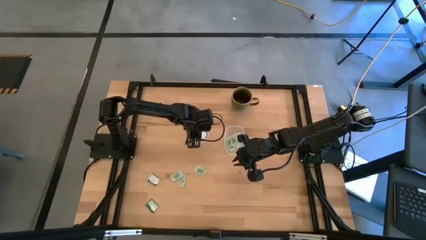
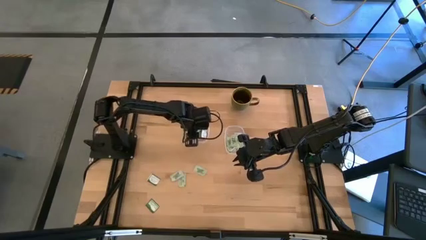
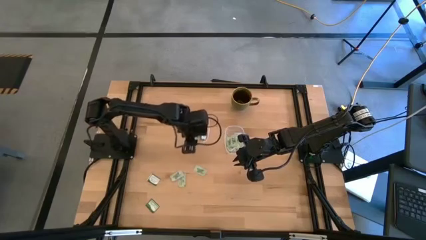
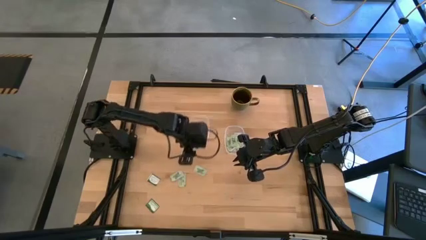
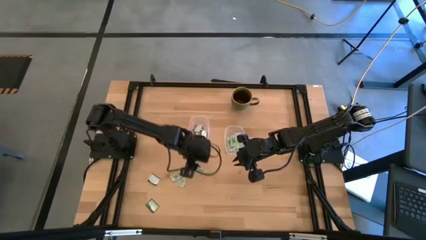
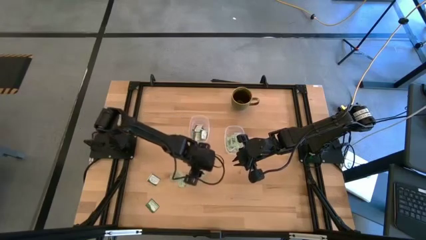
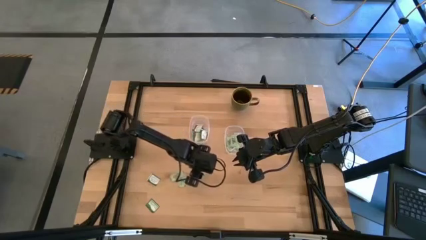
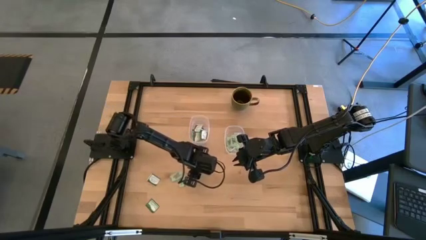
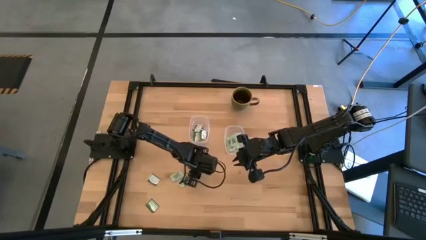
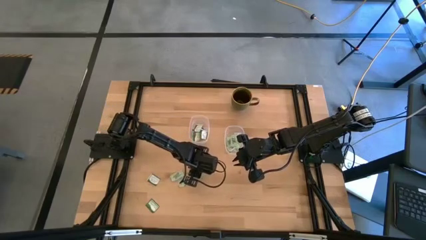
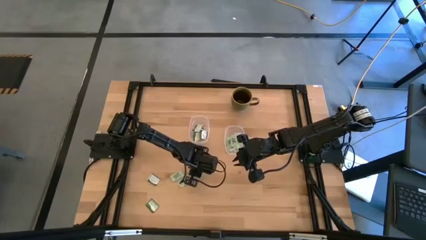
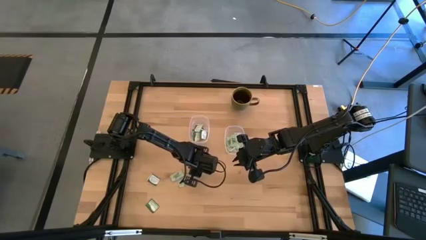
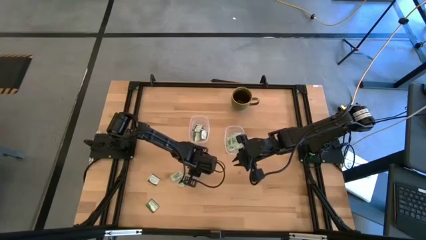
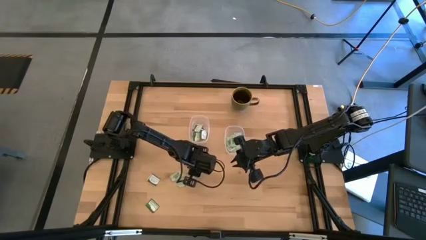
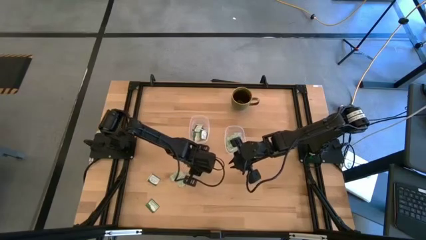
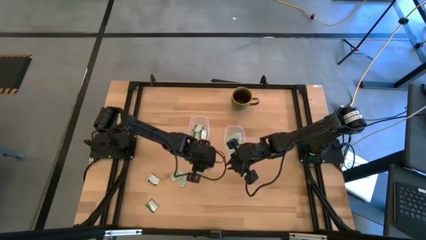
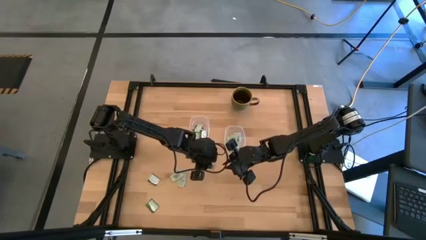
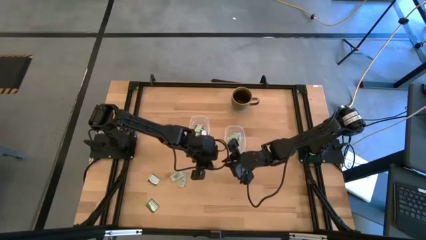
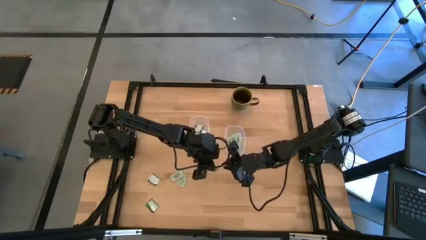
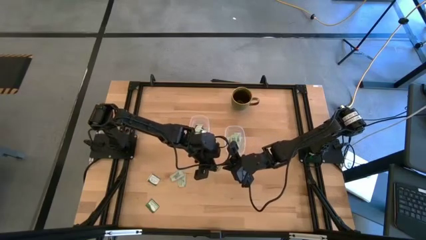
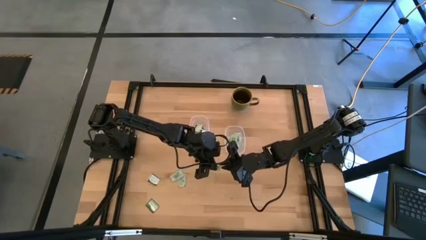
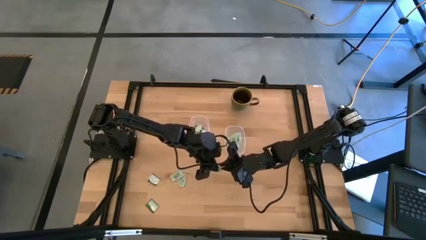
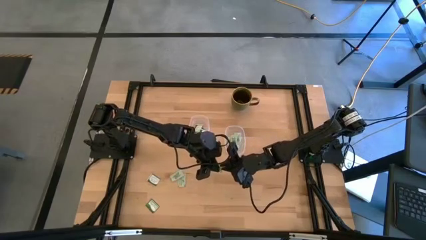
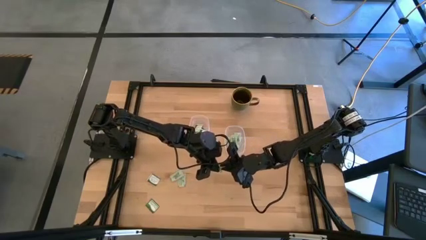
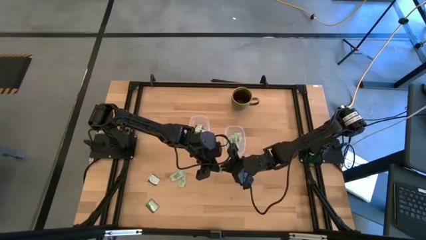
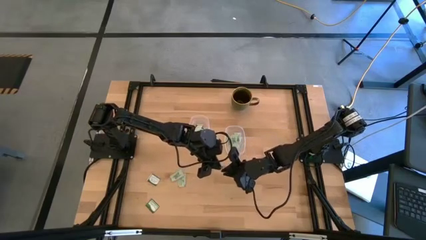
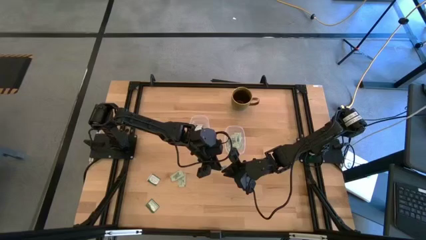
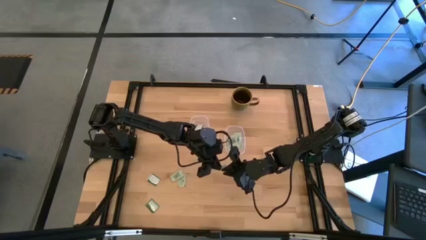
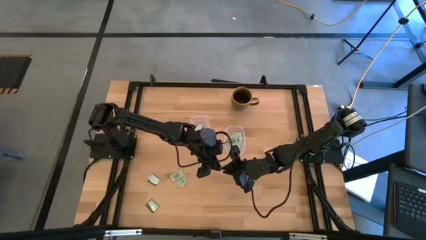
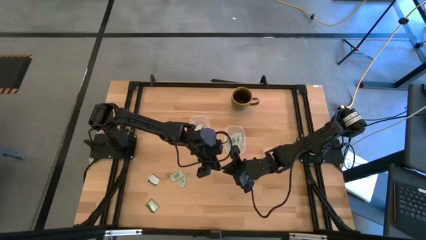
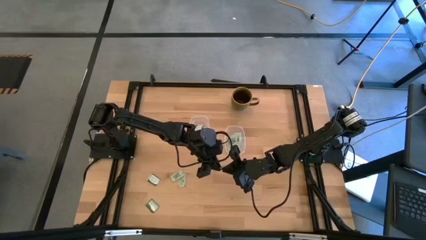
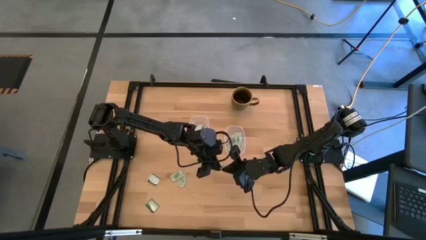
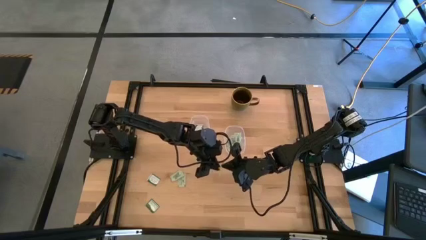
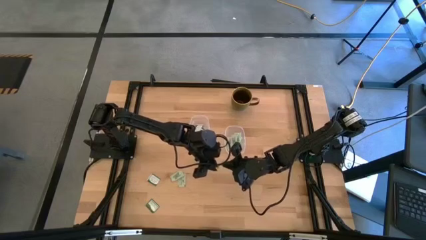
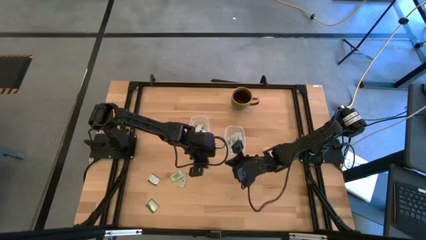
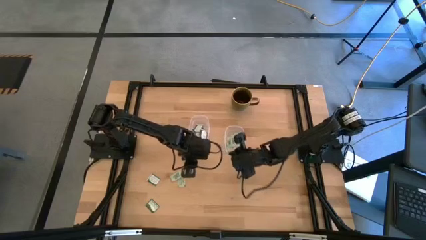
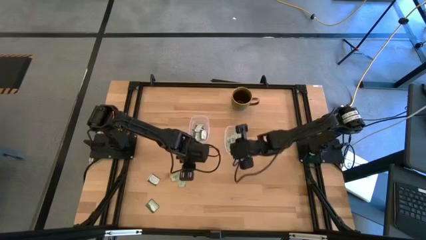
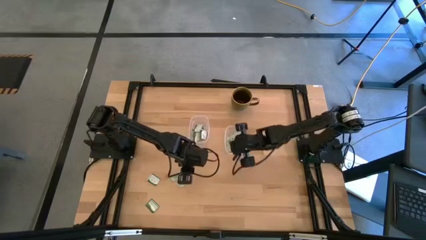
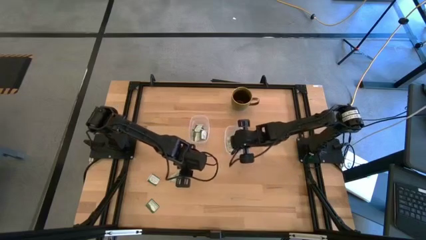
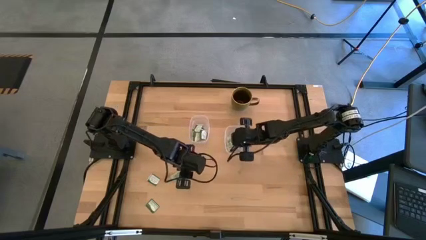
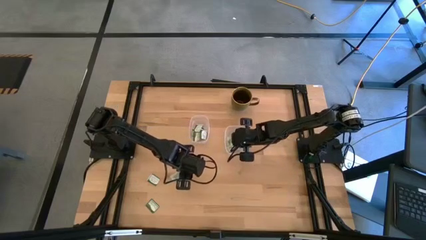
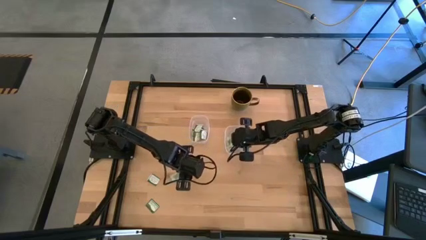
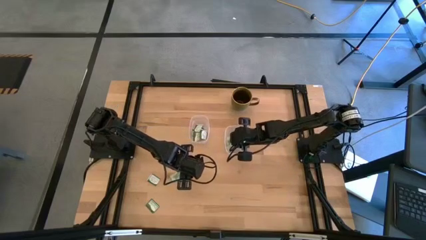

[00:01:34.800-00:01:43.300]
Task: Pick and place items into bin
Put the stevia packet into the right transparent bin

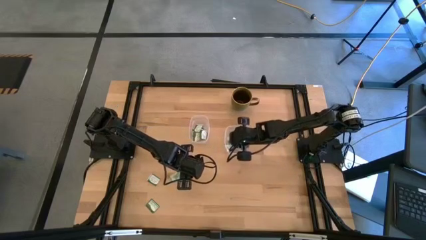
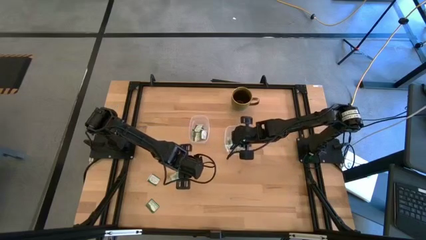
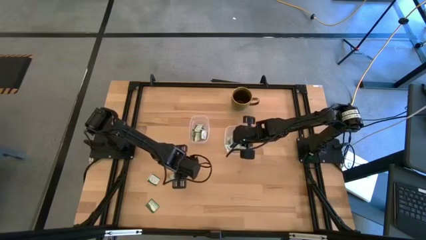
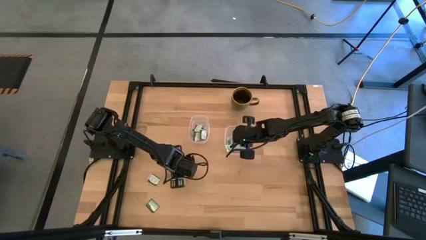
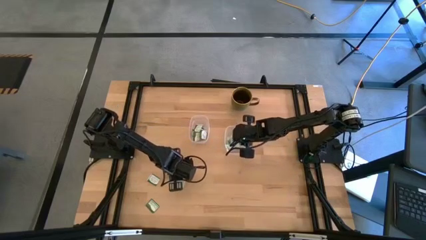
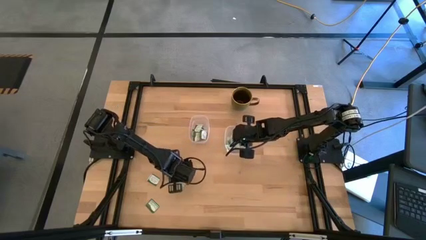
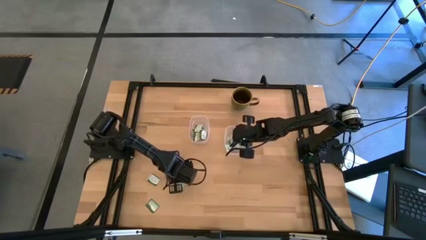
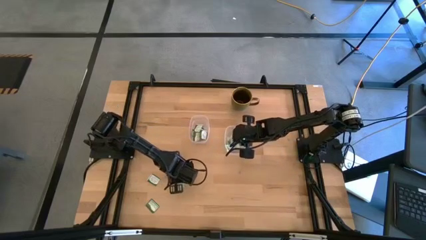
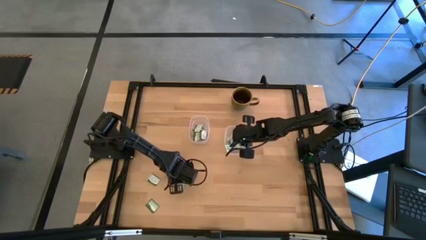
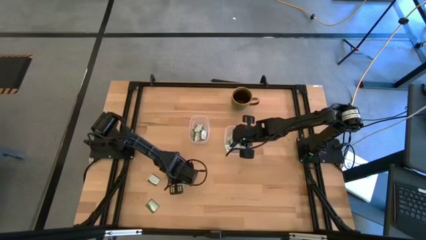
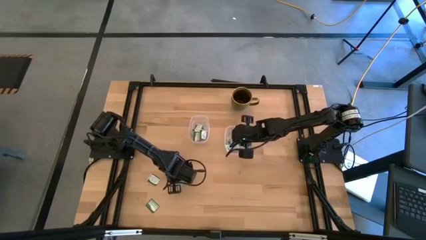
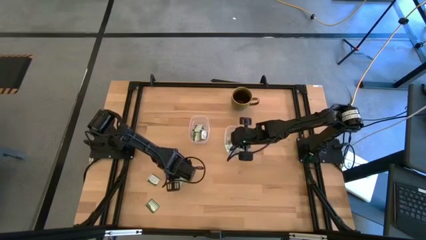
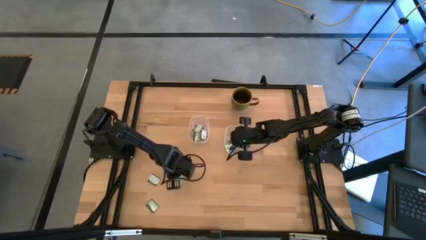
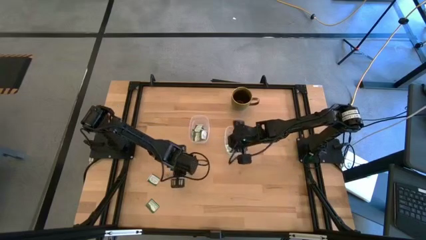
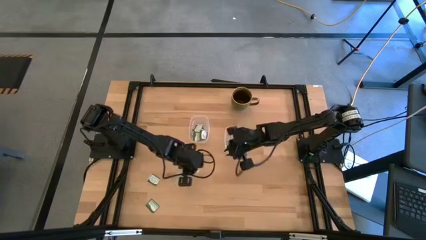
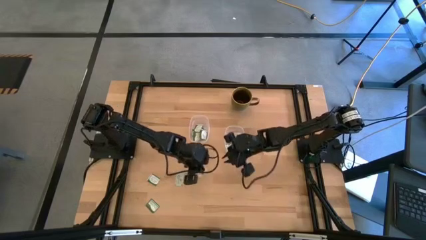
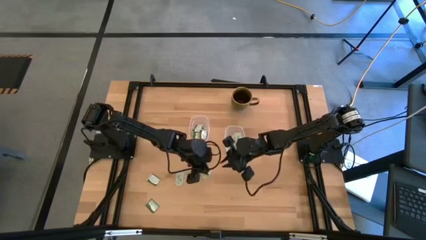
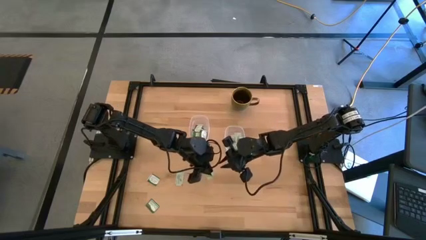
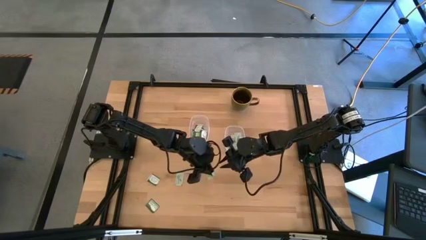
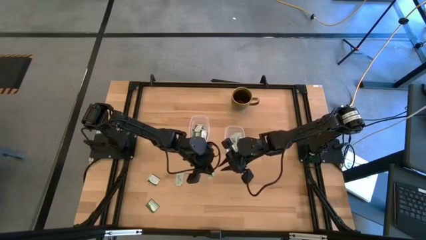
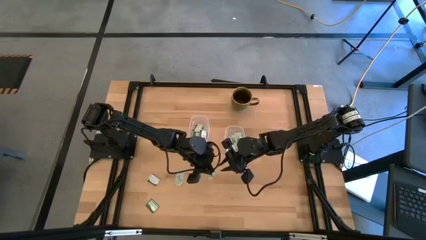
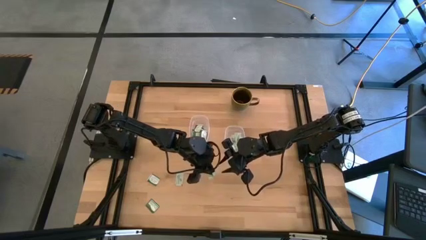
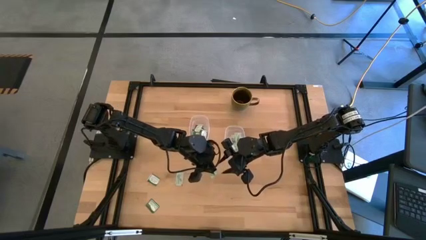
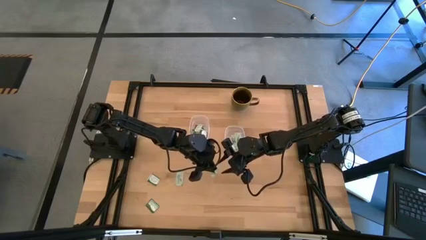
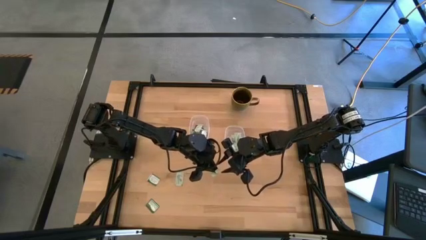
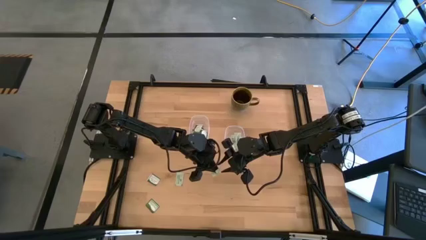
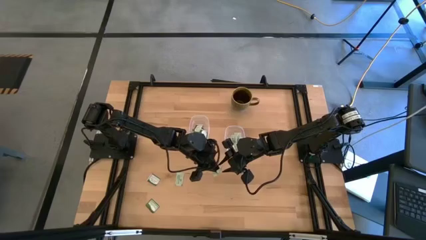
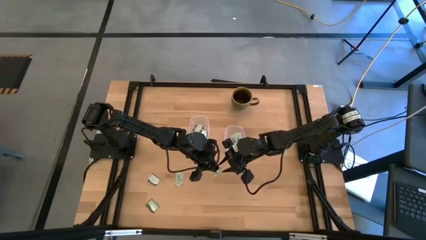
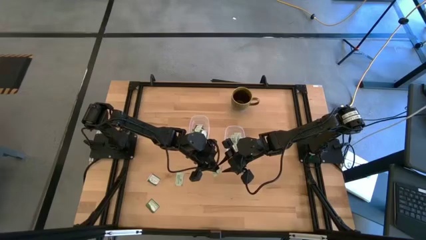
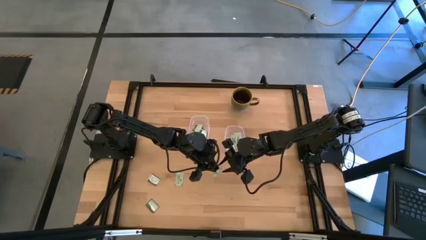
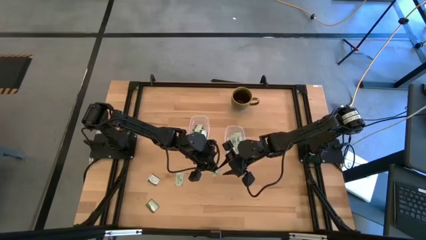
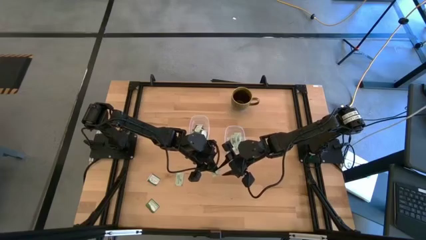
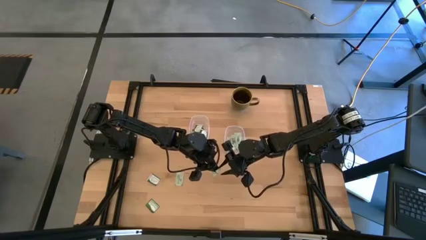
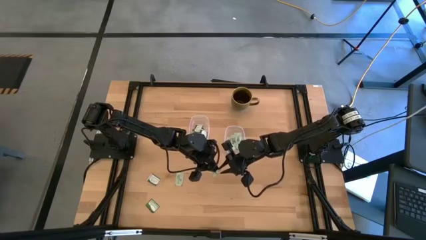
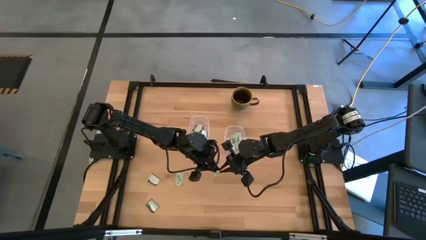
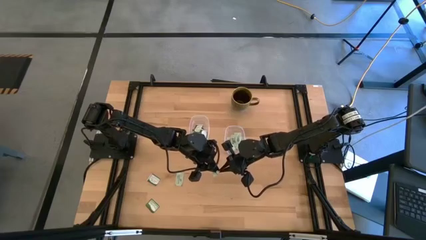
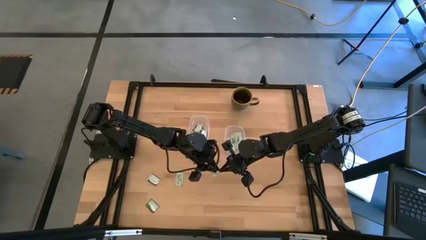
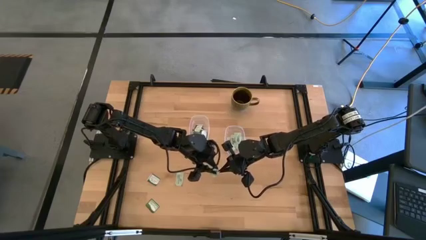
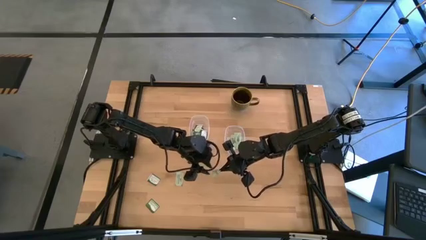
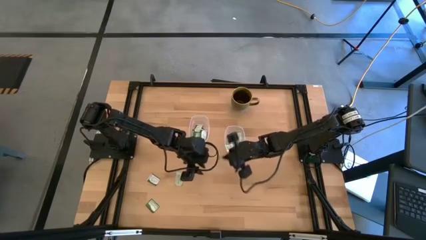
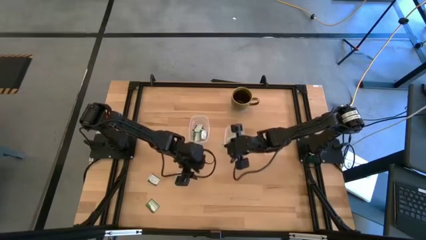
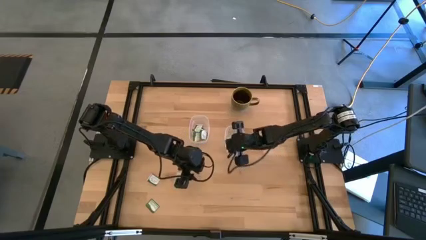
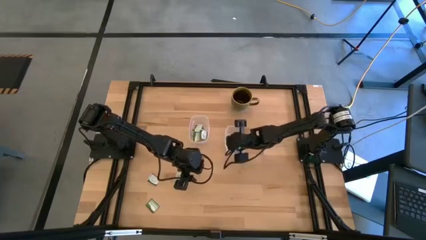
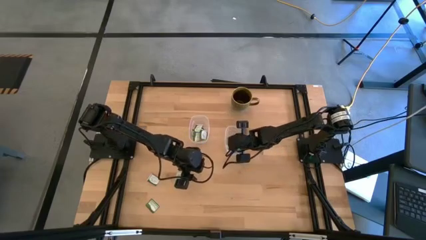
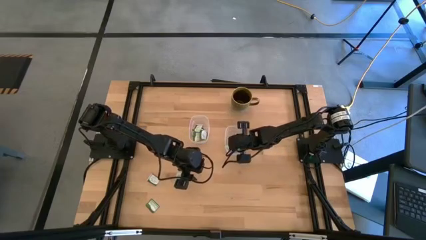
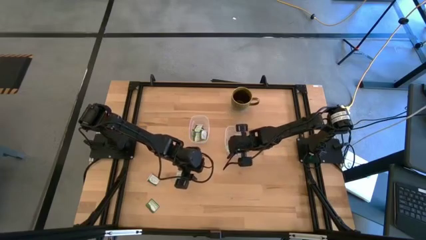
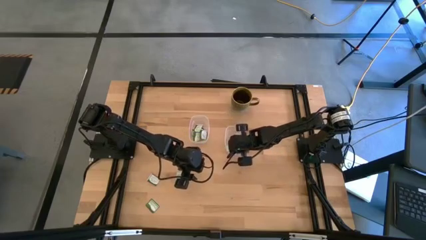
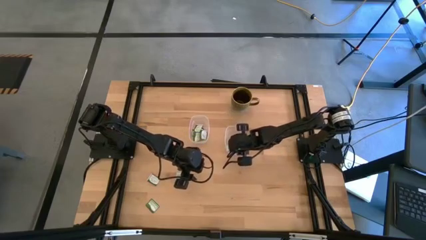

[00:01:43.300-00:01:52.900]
Put the stevia packet into the right transparent bin
